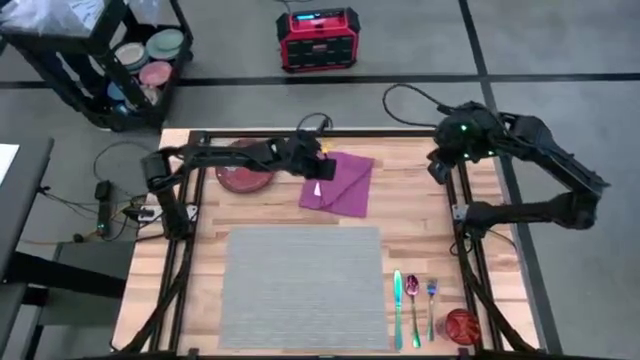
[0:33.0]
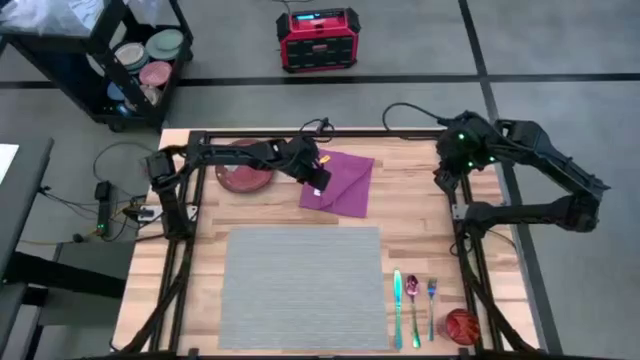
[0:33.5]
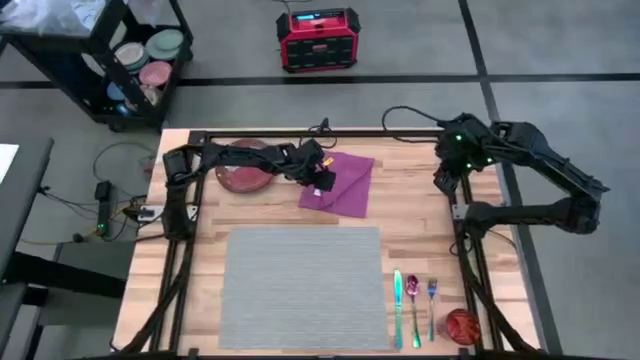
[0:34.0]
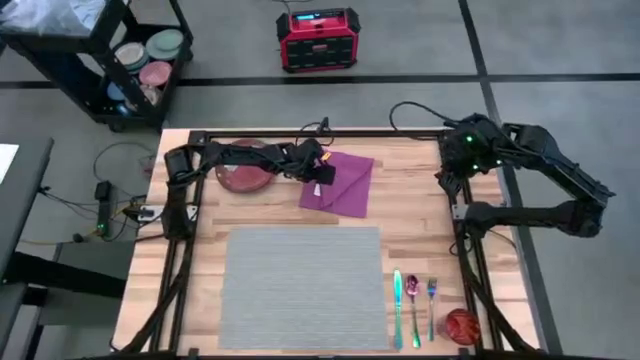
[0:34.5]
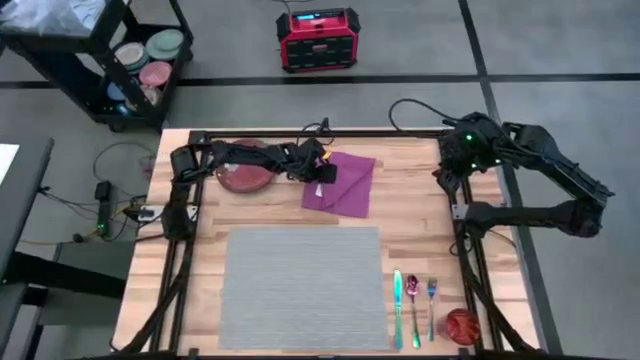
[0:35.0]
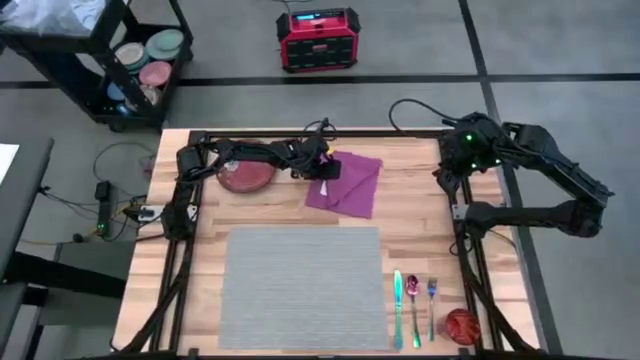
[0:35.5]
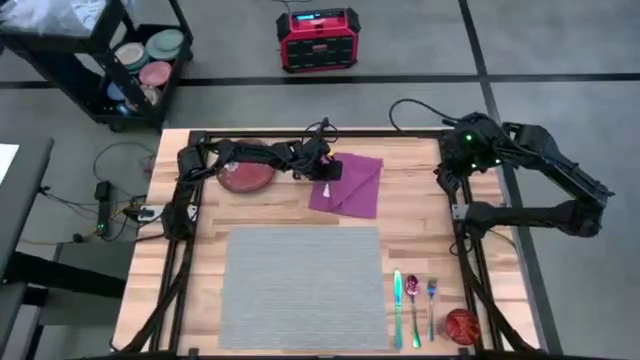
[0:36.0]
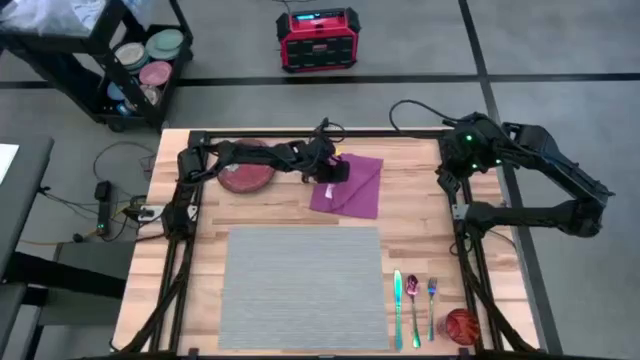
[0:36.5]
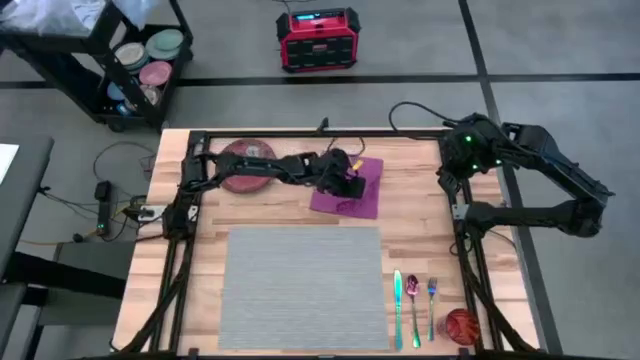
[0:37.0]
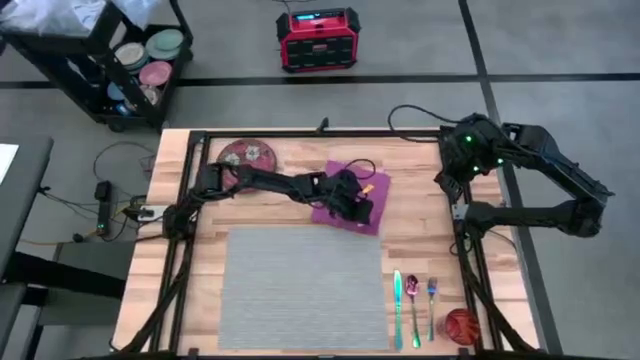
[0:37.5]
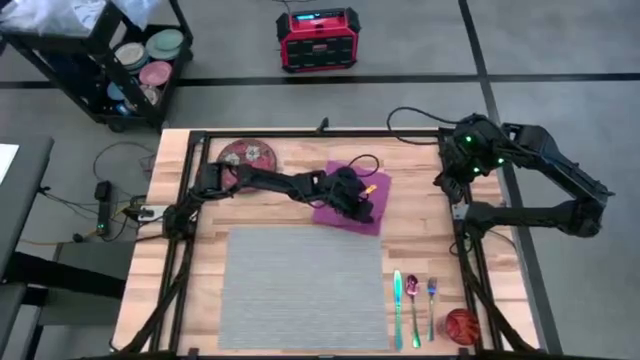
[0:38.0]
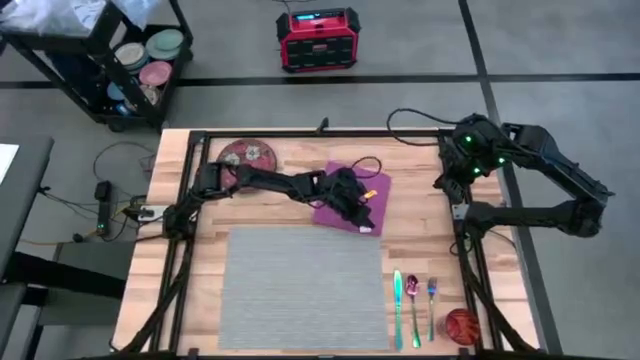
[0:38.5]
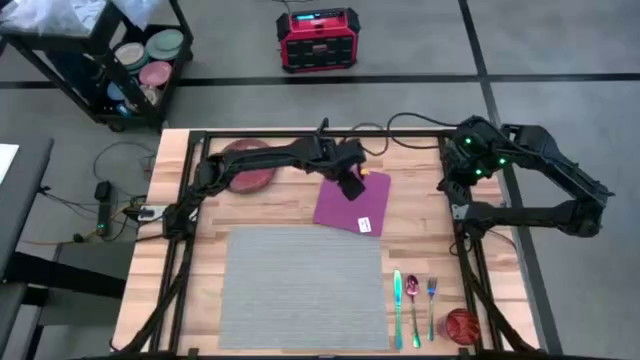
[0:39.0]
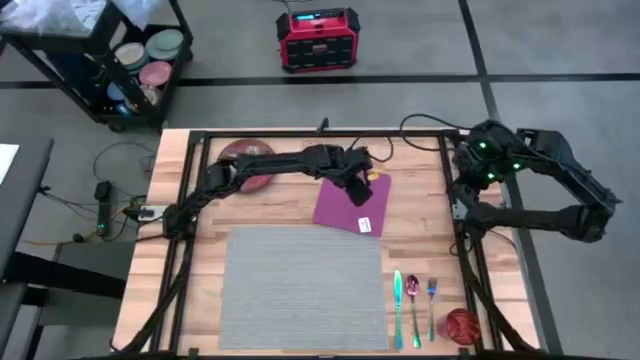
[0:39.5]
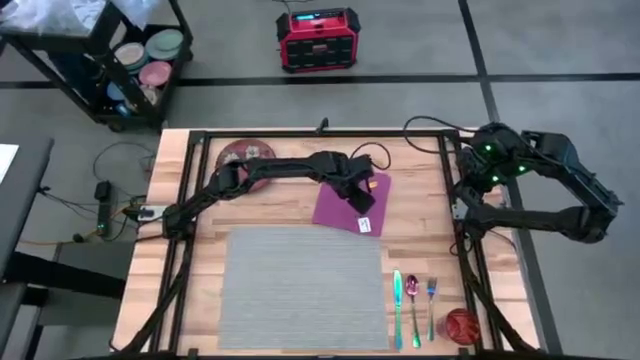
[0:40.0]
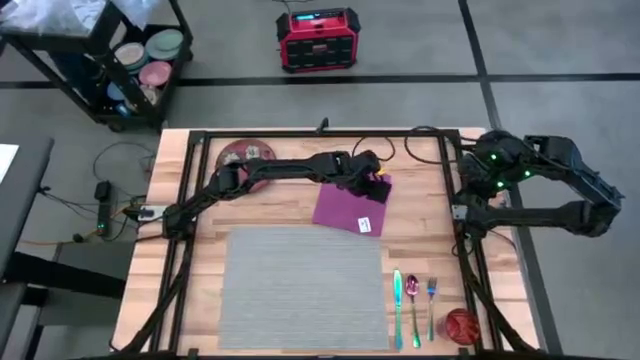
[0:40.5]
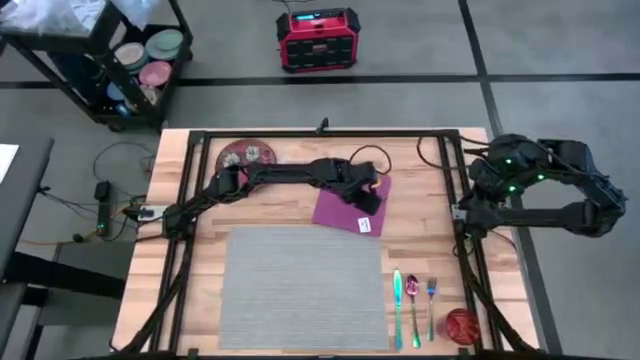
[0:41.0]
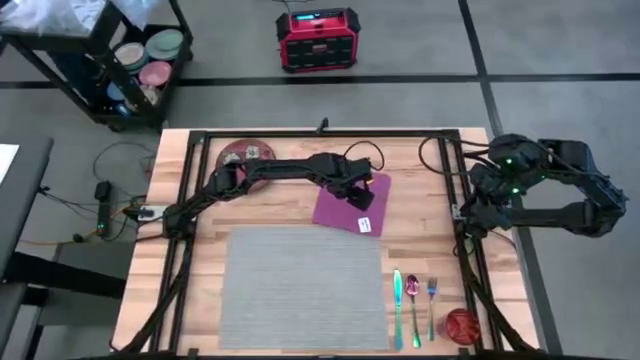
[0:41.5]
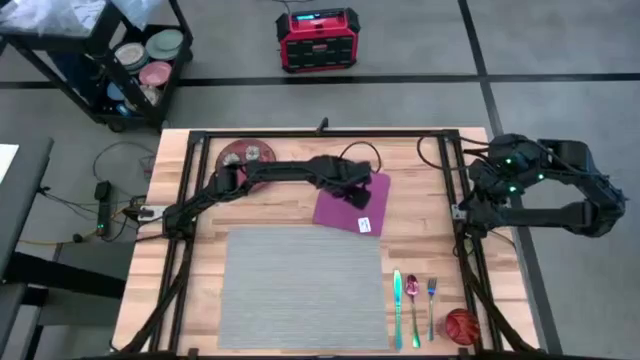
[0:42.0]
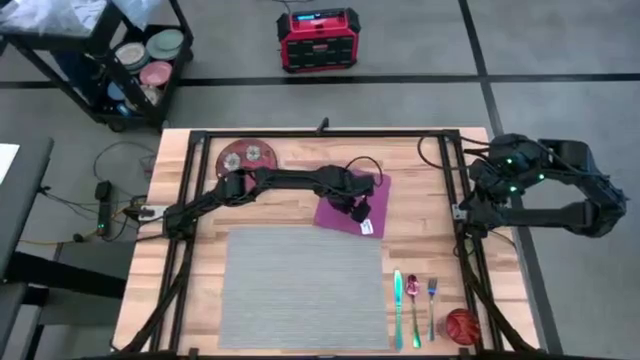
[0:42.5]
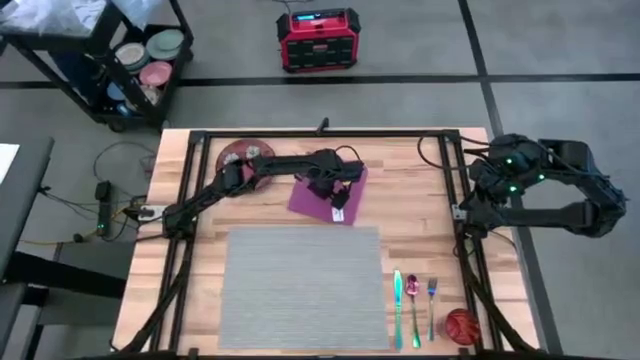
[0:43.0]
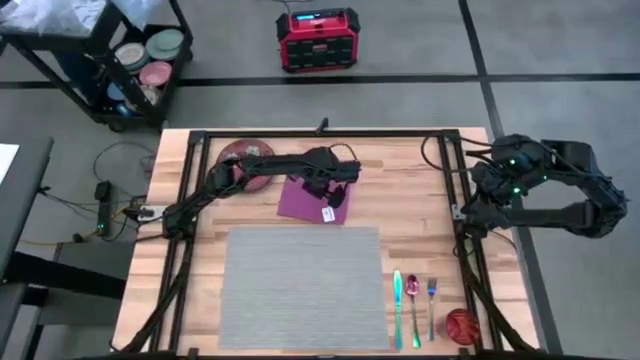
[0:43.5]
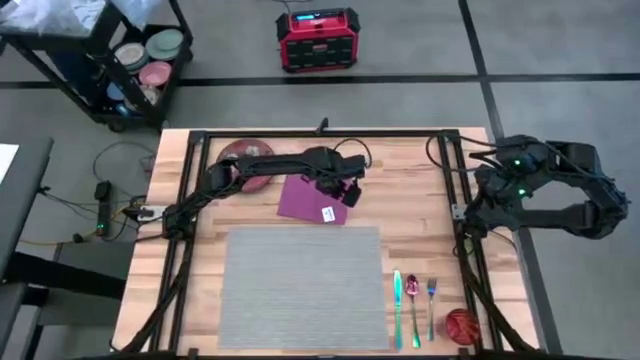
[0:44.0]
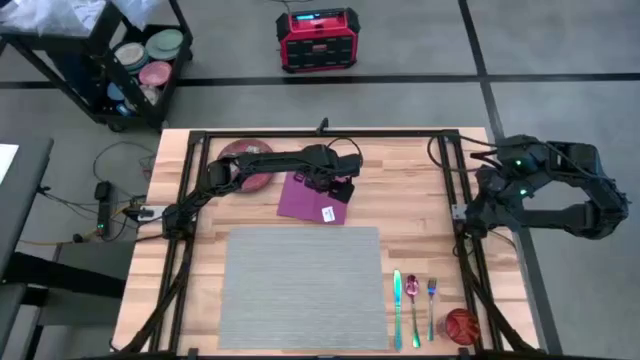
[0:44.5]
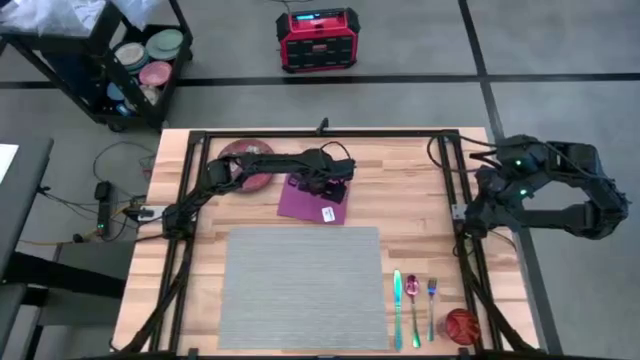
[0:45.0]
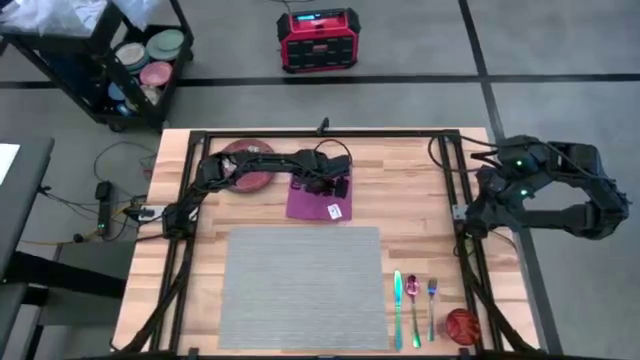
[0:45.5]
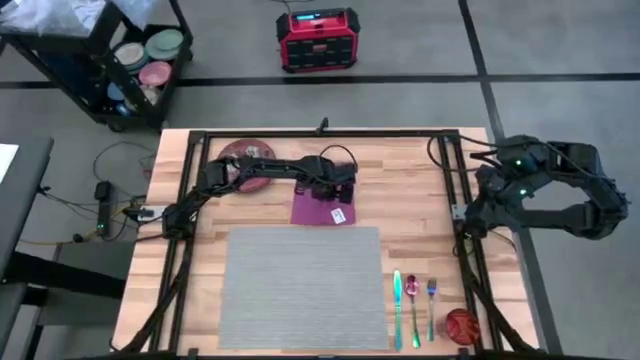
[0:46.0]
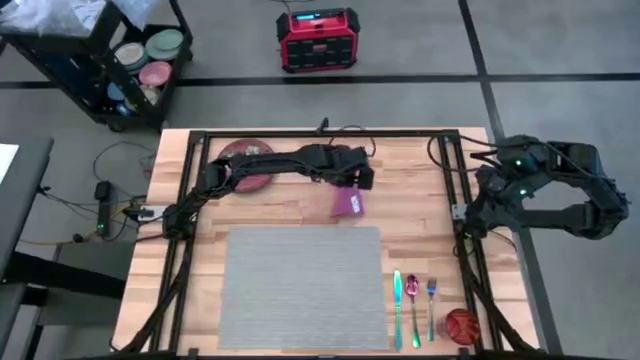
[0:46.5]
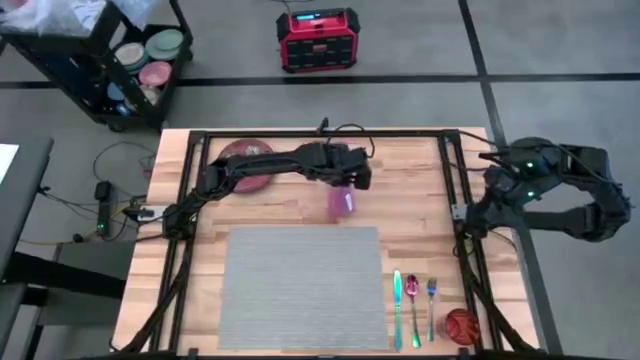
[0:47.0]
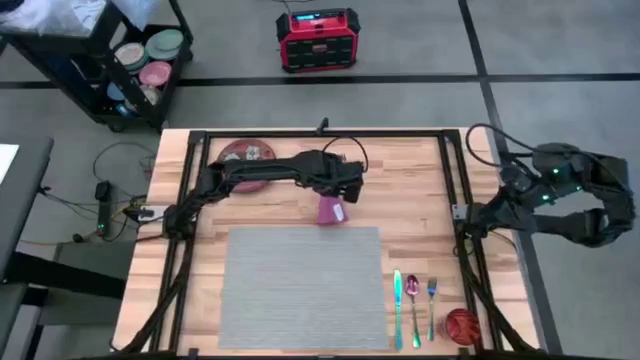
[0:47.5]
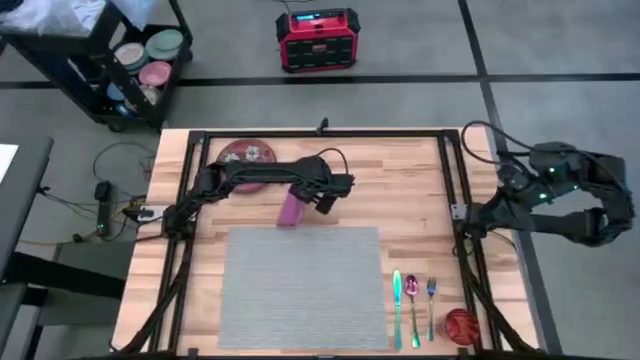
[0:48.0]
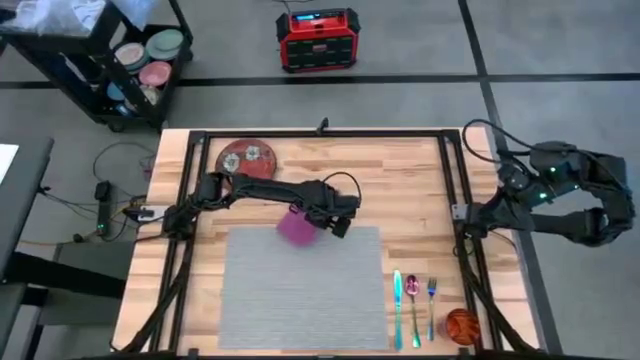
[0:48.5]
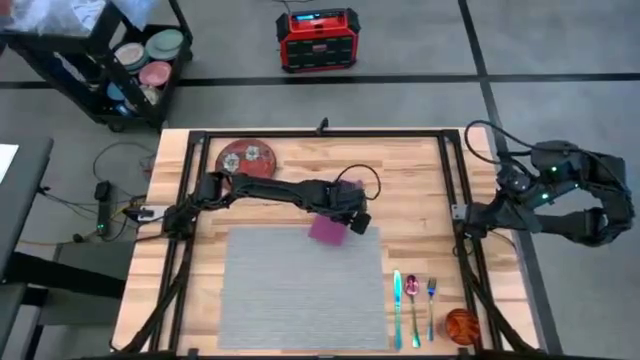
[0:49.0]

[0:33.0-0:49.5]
Task: Set table place
Fold the pink table towel

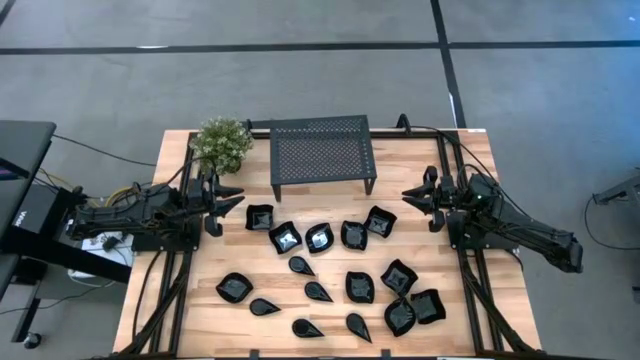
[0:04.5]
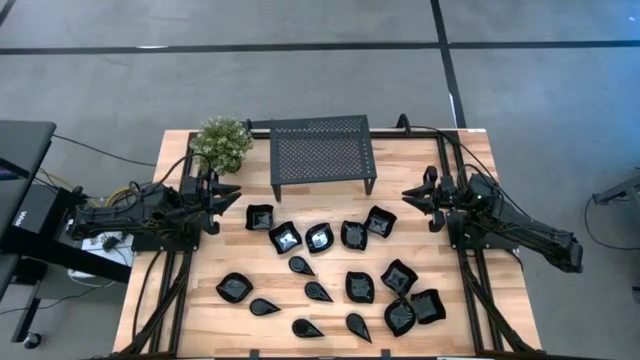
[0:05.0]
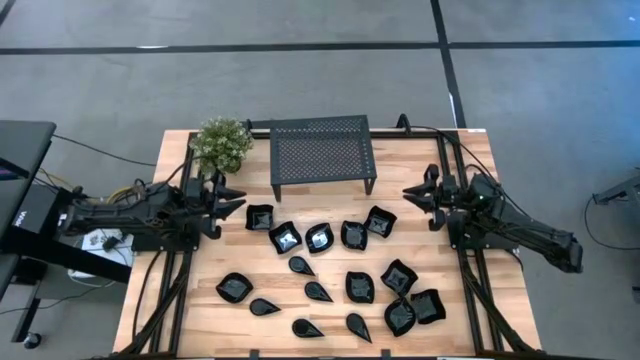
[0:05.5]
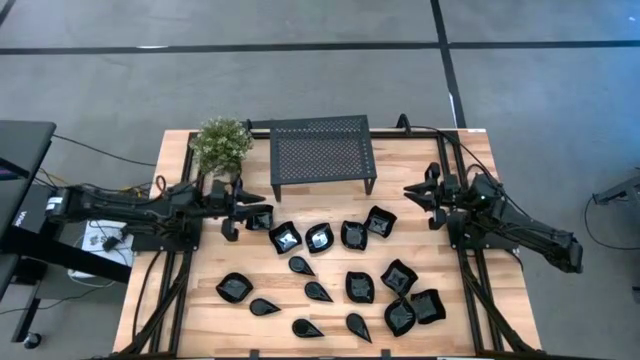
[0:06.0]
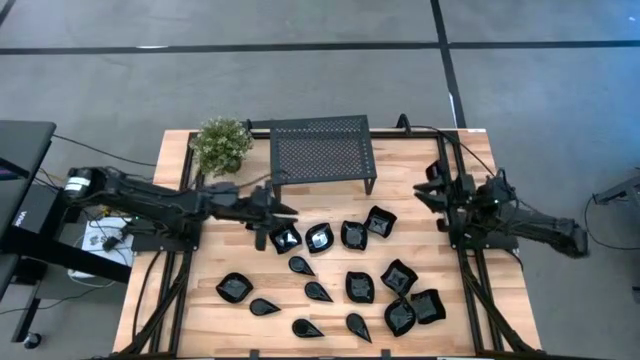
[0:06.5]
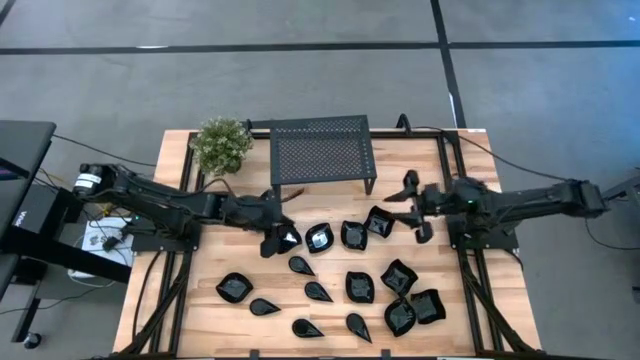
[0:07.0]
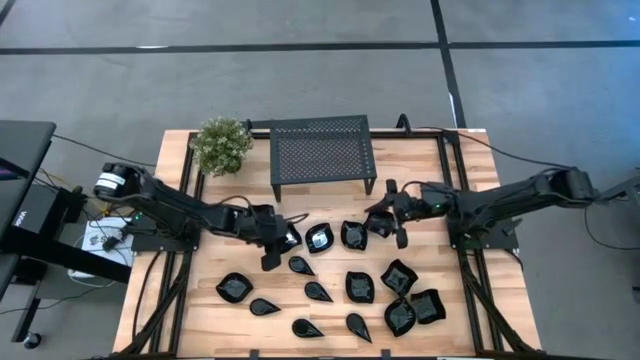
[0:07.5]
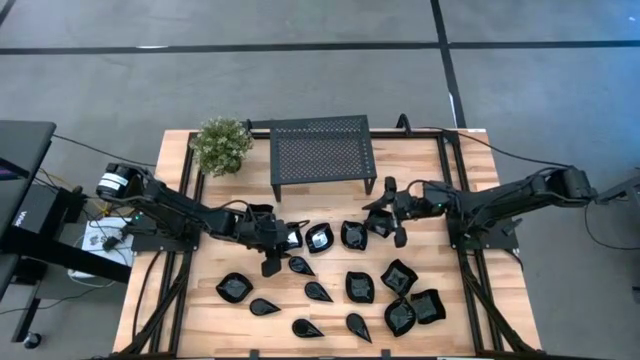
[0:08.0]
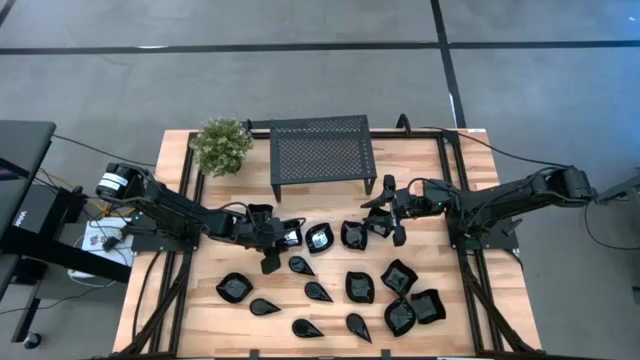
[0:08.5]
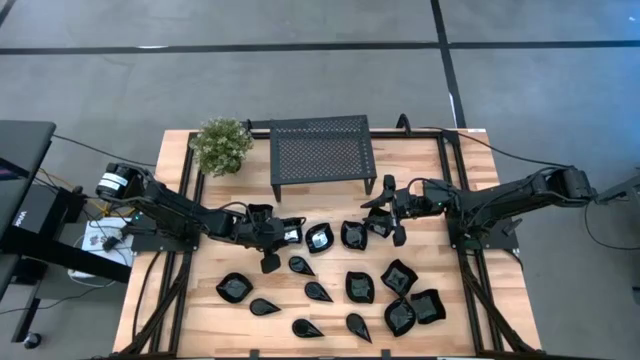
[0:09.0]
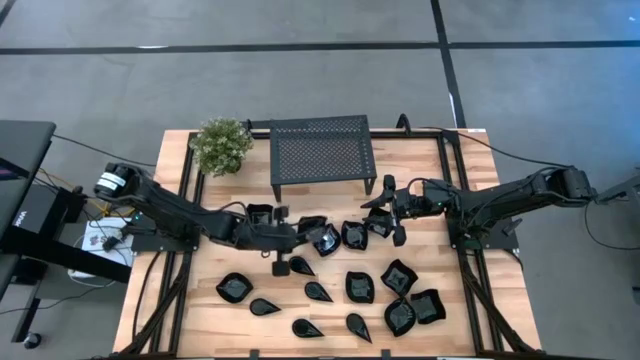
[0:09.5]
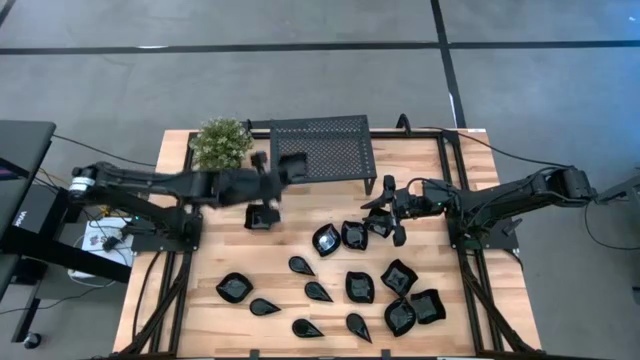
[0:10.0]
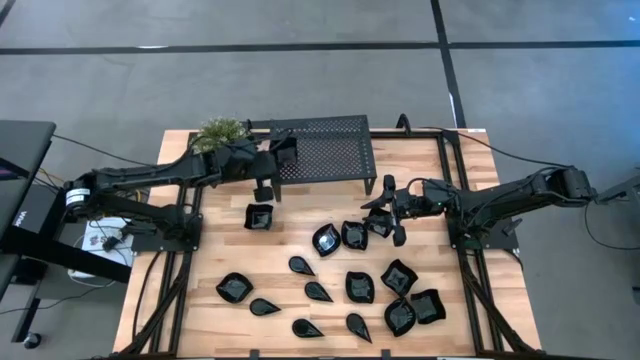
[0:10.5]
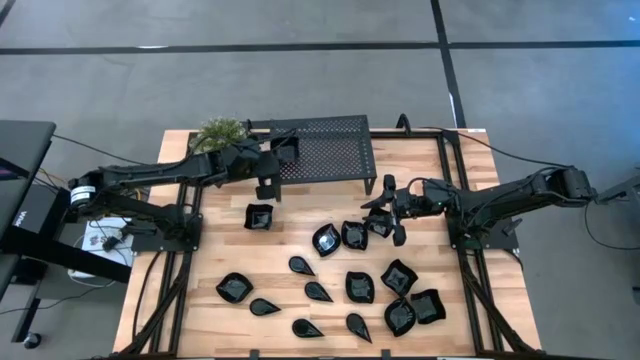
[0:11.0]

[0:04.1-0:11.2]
Task: Pick & Place Mini shaped plates
Put the distorted square plate on the shelf
